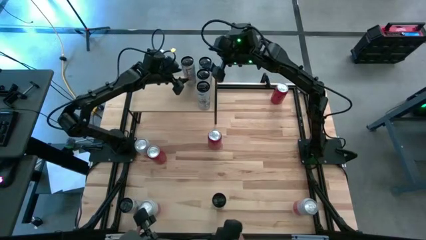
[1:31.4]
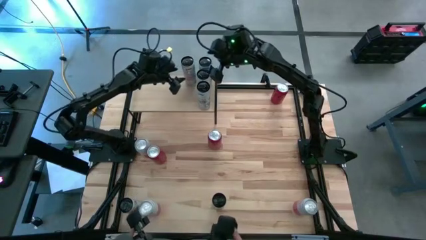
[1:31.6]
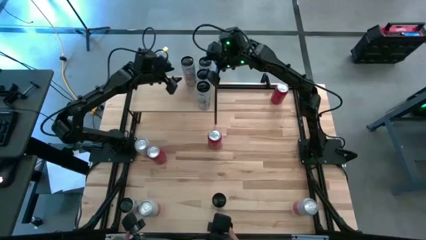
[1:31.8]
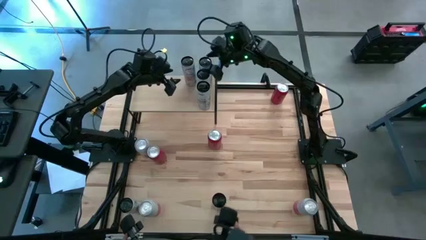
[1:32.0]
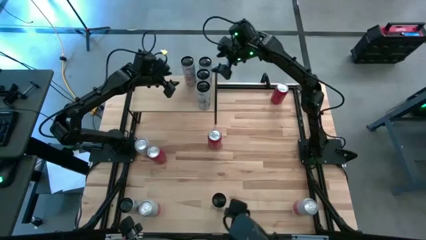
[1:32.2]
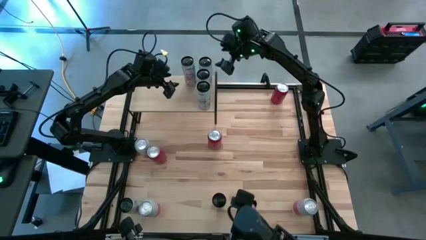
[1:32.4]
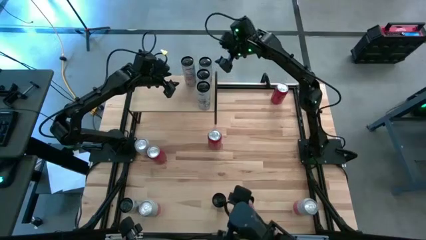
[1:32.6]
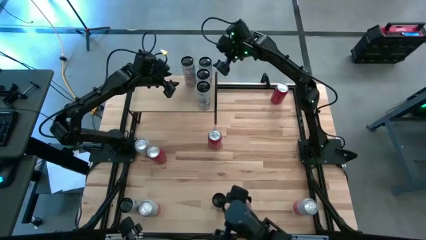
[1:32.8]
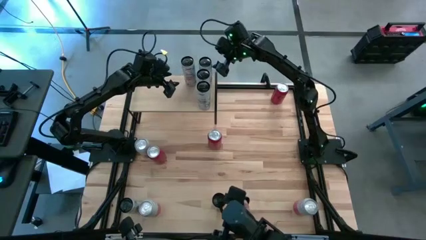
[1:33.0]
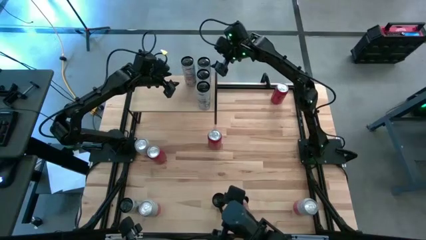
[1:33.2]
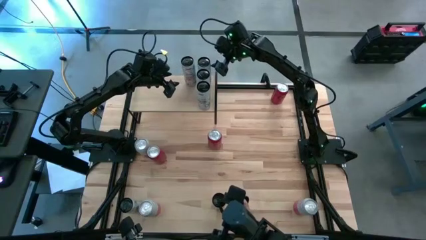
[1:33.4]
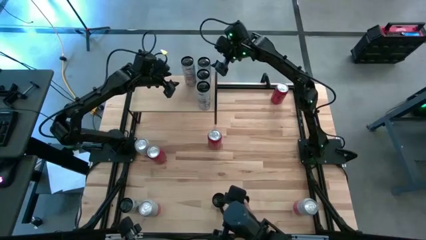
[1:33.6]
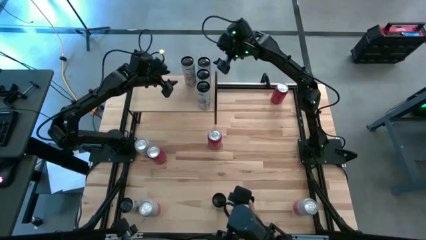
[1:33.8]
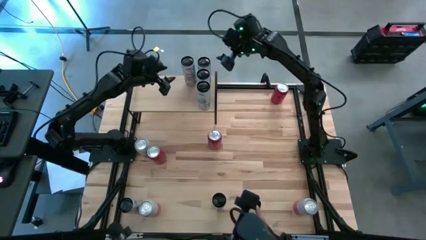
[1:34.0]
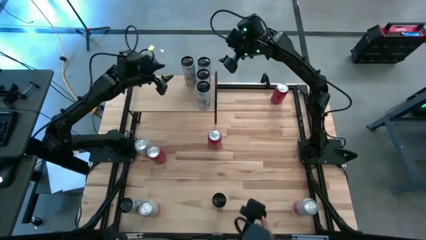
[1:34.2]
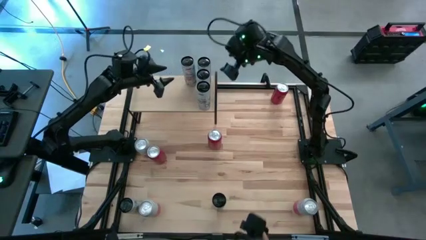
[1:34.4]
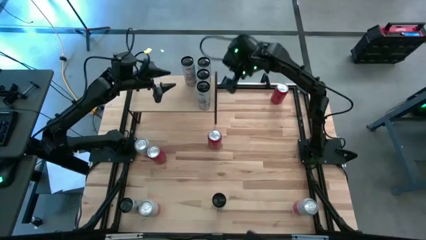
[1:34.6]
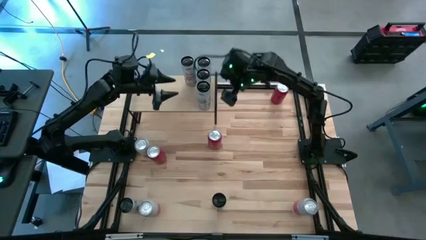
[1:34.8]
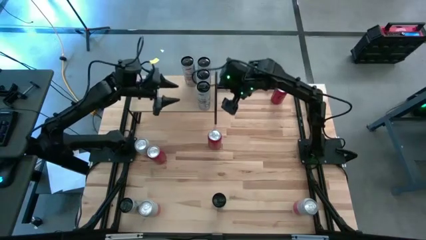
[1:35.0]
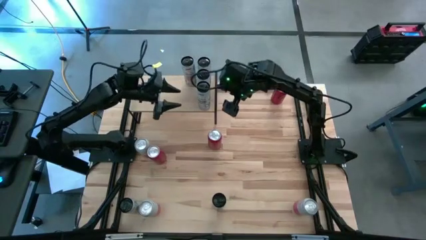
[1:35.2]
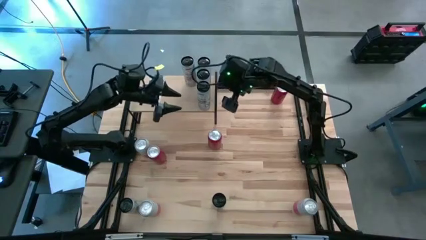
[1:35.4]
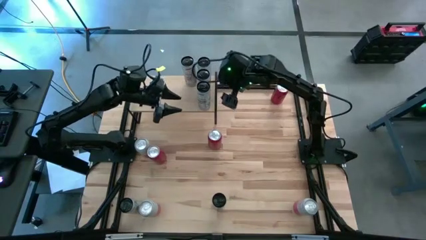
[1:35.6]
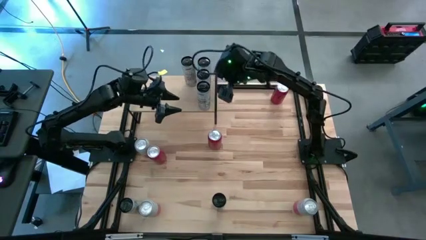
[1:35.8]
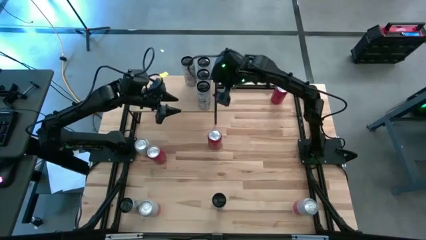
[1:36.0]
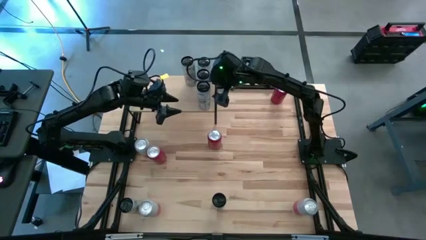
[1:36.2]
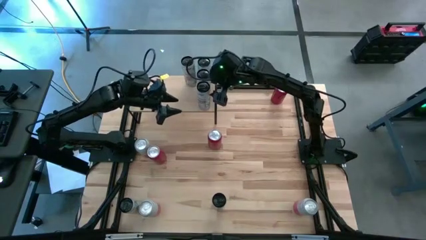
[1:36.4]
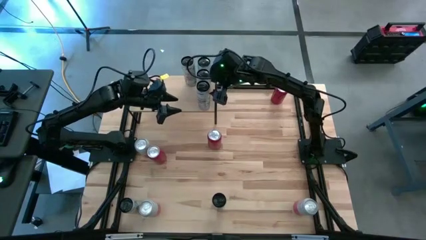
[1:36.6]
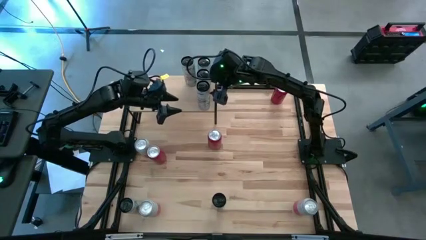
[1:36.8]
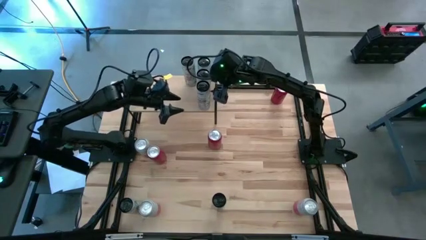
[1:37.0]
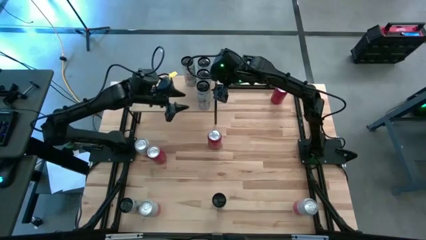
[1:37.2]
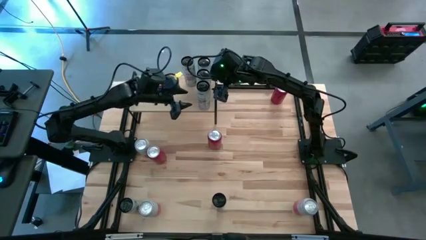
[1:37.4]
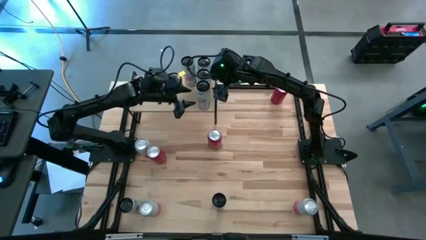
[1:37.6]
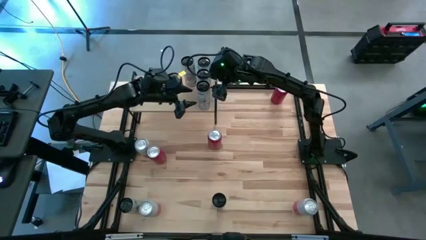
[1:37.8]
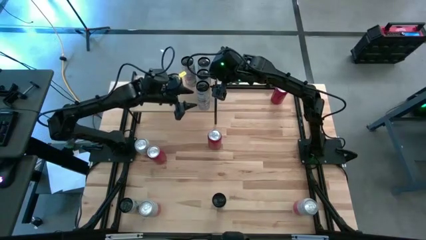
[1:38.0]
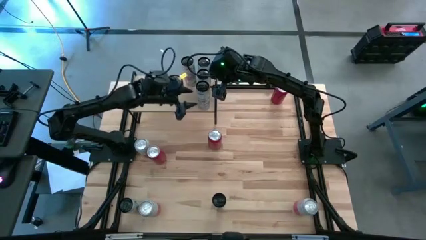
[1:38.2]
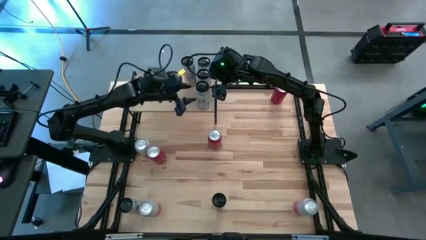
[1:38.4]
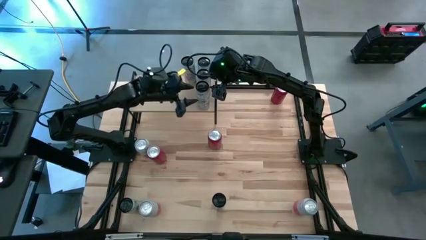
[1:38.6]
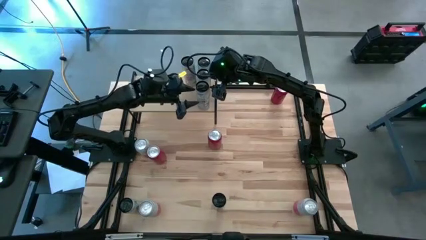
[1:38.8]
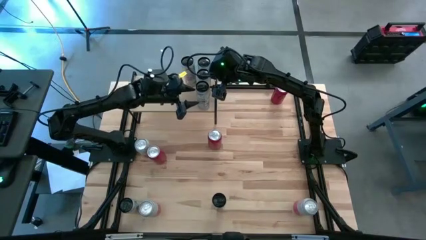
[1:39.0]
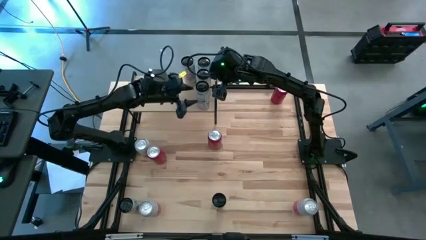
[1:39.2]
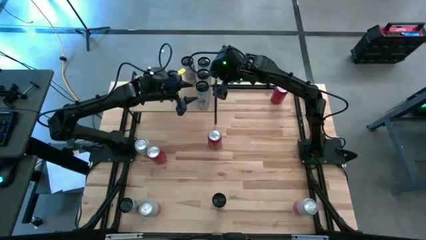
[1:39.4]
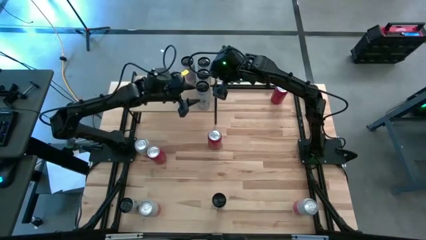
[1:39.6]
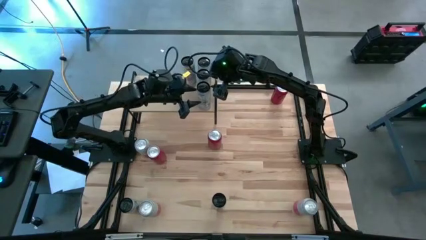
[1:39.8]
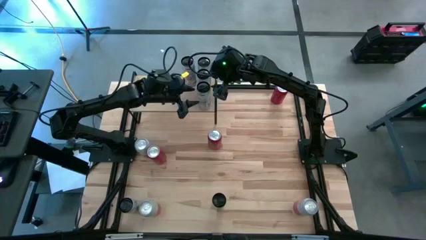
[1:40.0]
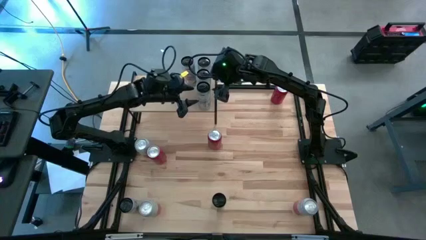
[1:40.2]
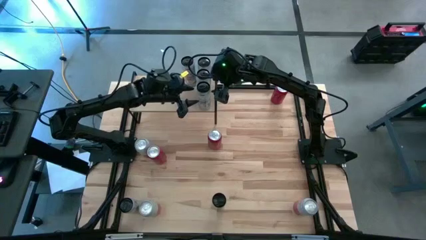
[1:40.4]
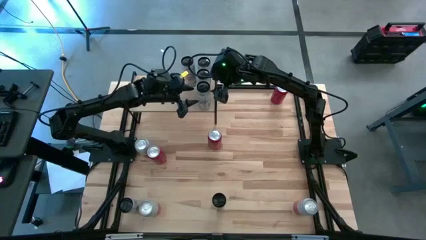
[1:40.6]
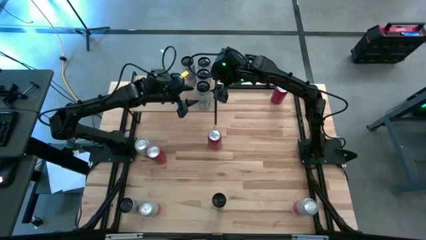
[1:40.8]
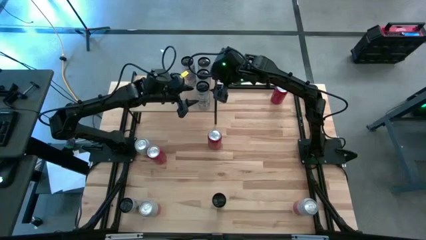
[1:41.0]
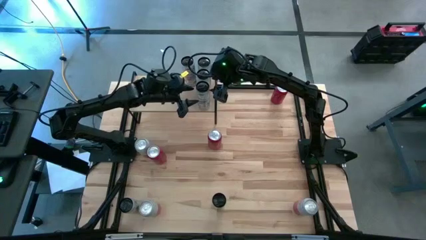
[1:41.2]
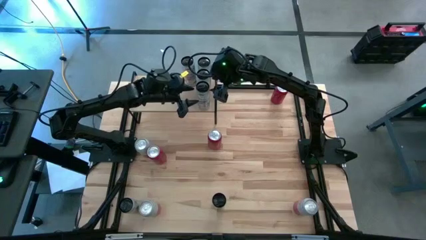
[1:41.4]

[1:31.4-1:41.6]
Task: Place canned beverage on shelf
Adjust the aligned blue soda cans on the shelf

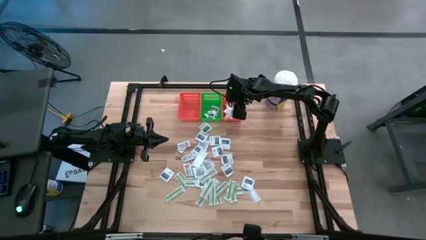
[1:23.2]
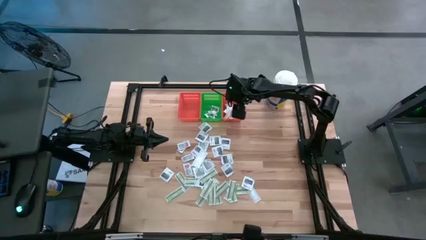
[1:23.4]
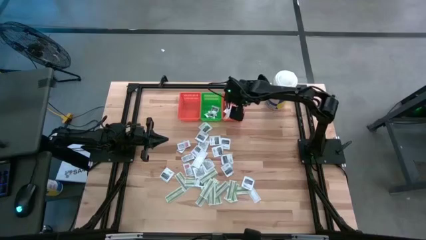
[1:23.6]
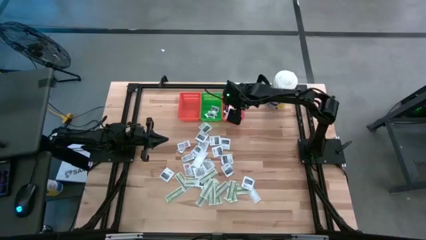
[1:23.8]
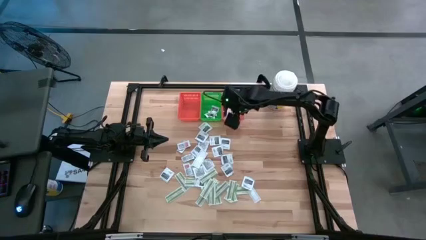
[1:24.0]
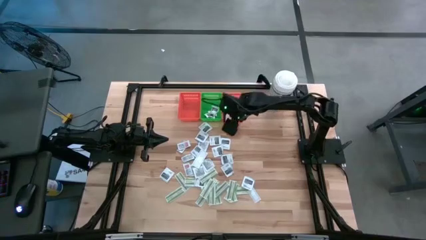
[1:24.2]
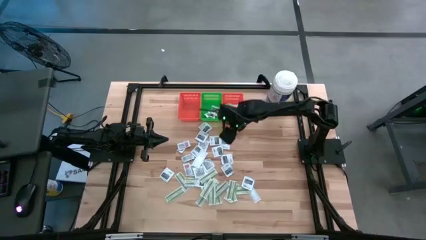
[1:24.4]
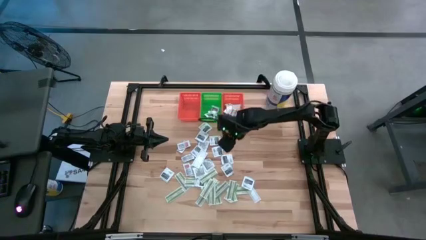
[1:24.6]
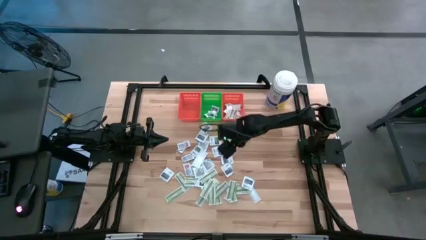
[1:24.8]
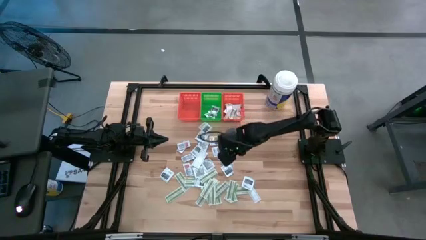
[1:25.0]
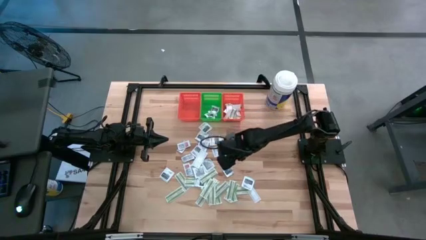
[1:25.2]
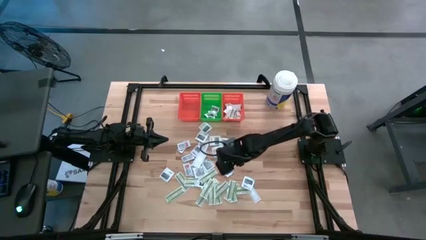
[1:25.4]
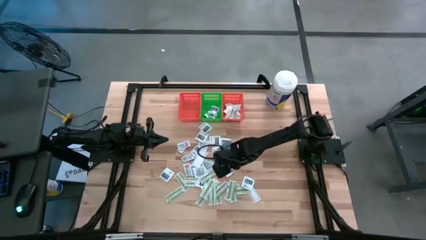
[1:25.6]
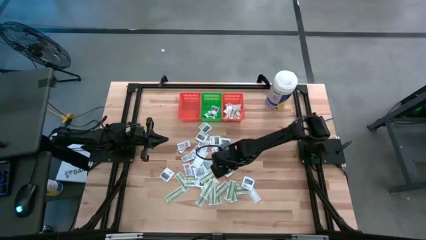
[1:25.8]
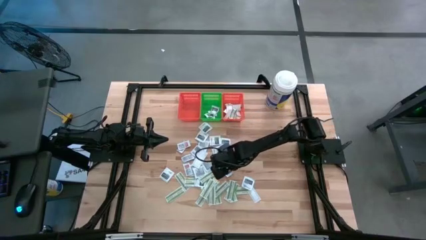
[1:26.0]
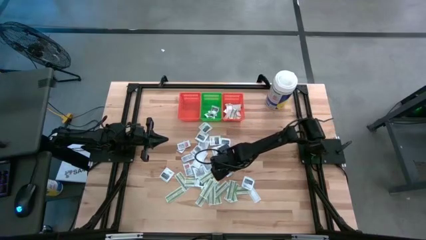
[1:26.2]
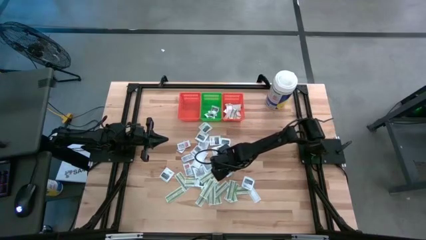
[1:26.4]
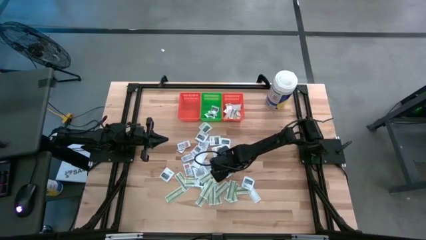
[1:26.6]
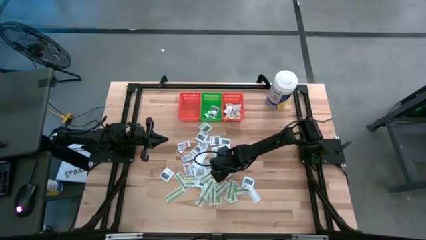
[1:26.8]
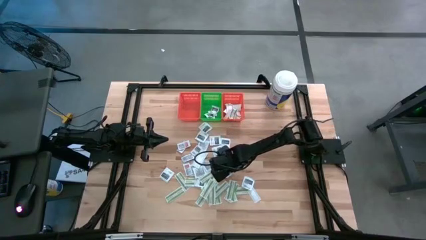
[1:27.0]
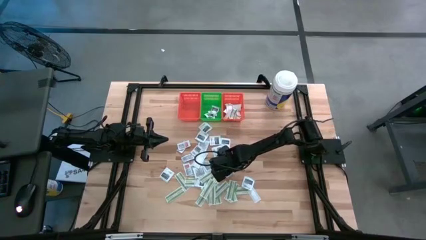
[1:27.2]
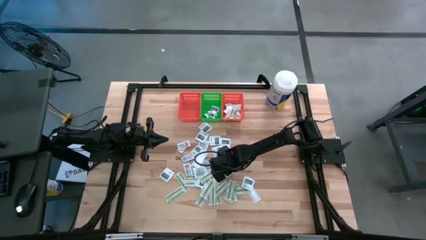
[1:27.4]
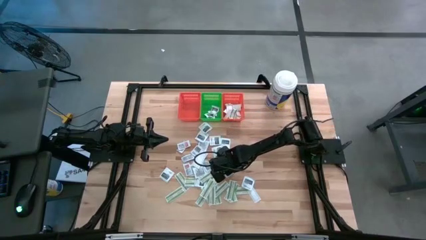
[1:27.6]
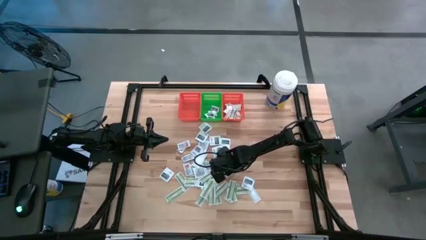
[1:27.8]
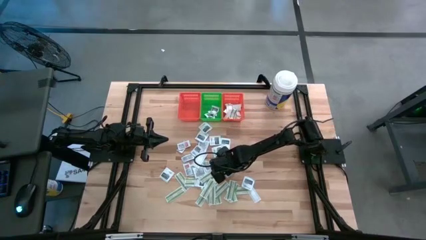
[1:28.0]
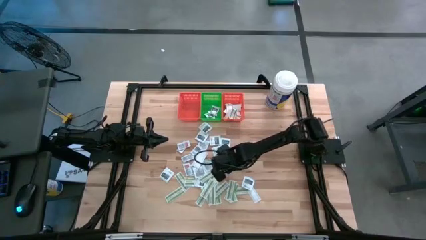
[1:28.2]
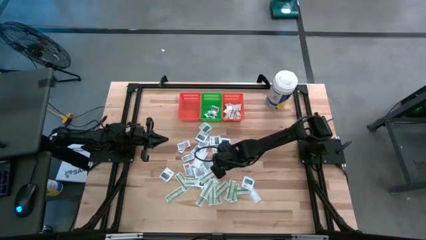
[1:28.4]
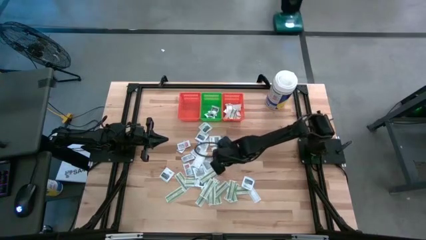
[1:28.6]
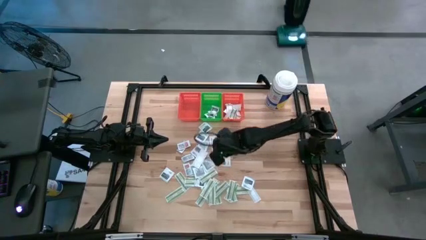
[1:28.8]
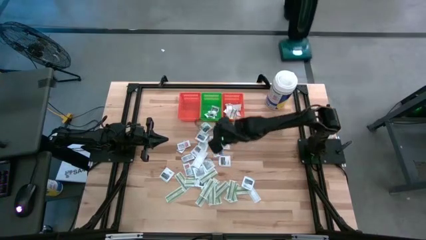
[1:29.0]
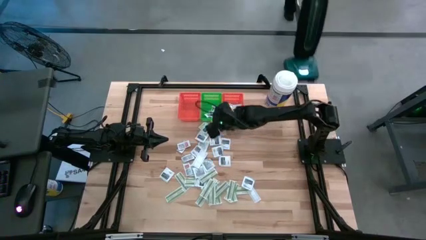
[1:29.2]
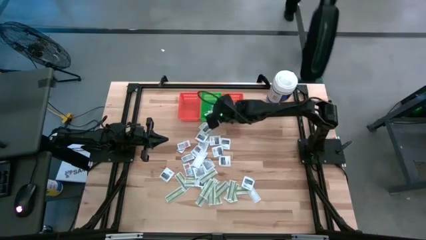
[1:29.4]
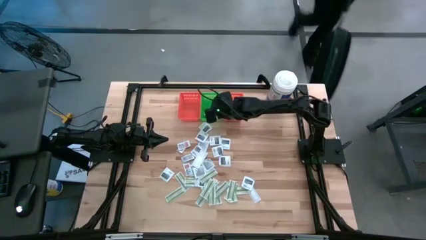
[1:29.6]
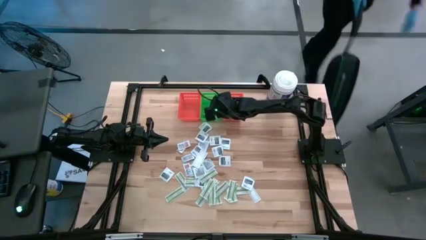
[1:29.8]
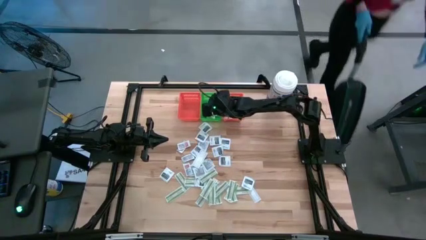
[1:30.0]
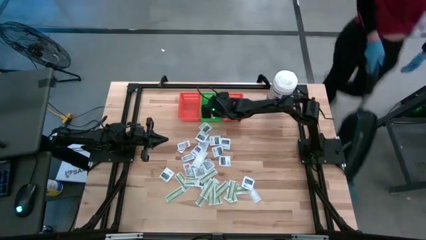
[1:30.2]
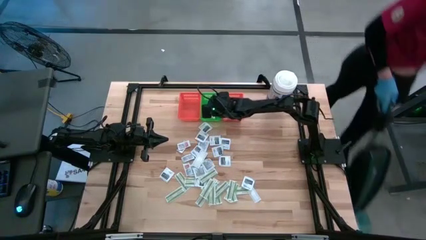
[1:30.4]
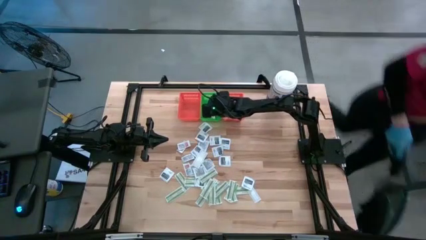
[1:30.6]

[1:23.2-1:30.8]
Task: Pick & Place First Aid Supplies
Put the towelette pack into the green bin
